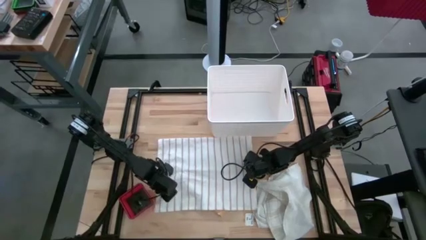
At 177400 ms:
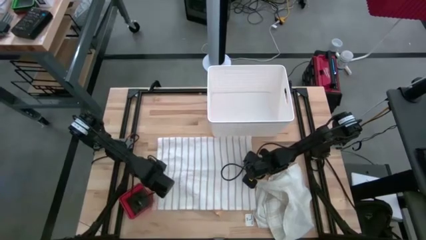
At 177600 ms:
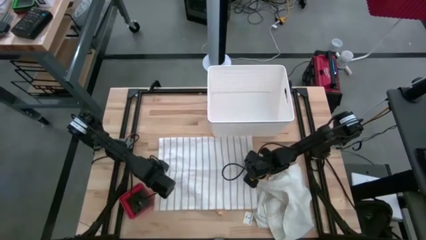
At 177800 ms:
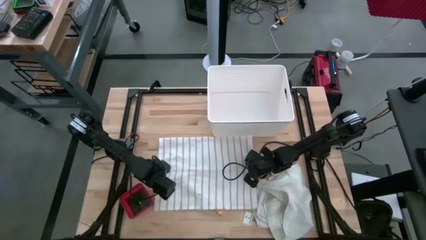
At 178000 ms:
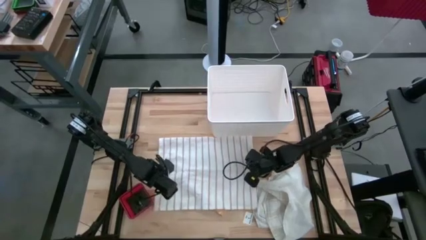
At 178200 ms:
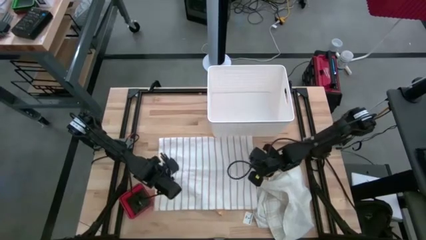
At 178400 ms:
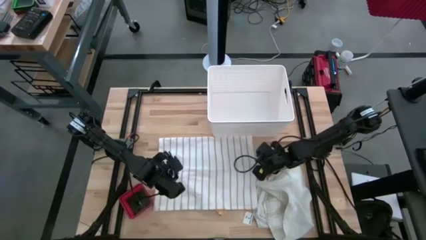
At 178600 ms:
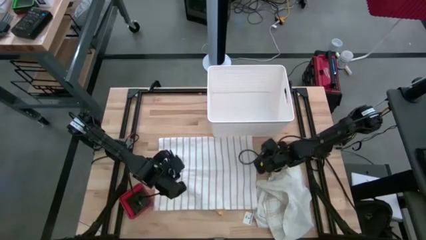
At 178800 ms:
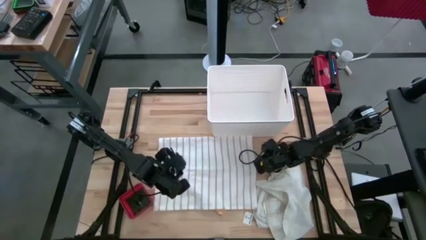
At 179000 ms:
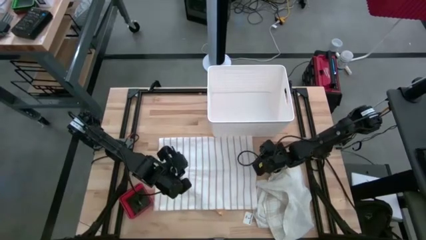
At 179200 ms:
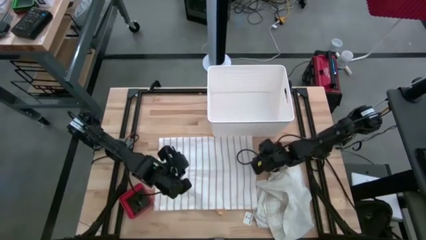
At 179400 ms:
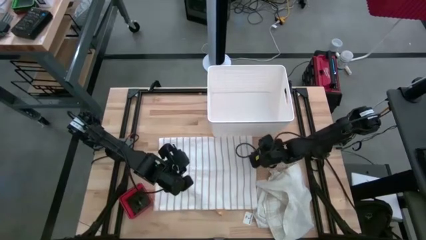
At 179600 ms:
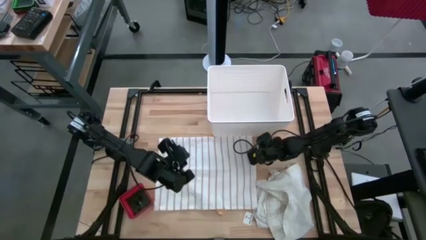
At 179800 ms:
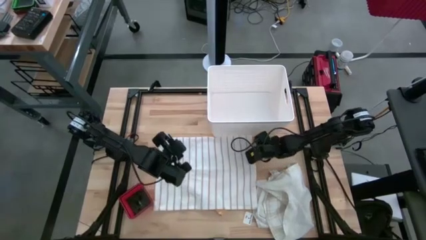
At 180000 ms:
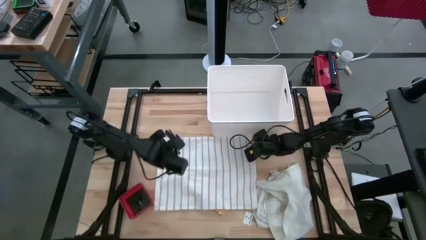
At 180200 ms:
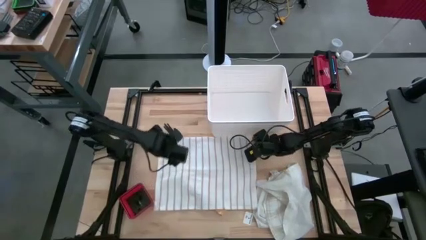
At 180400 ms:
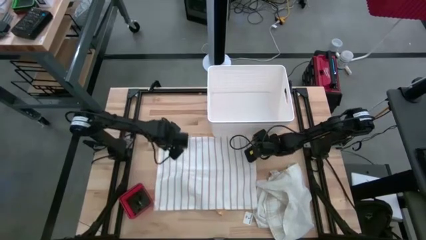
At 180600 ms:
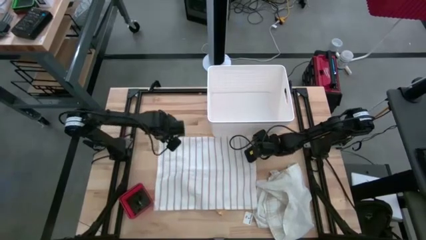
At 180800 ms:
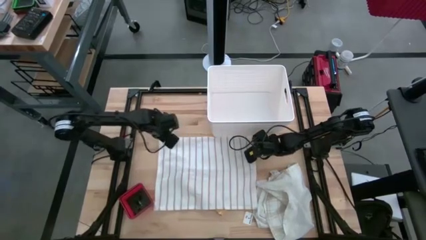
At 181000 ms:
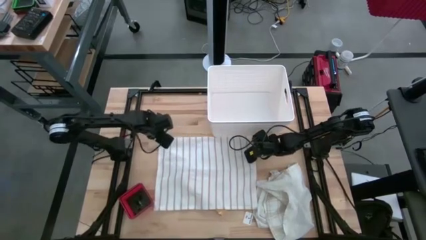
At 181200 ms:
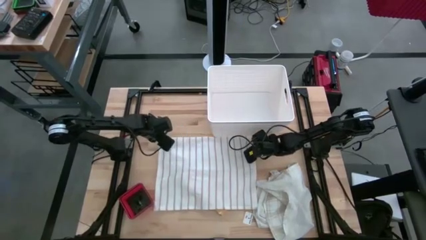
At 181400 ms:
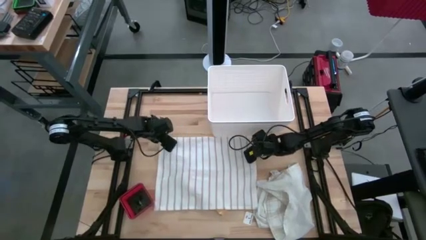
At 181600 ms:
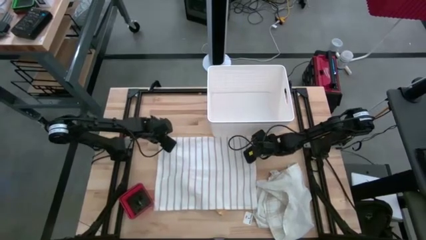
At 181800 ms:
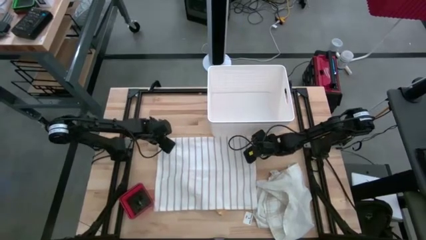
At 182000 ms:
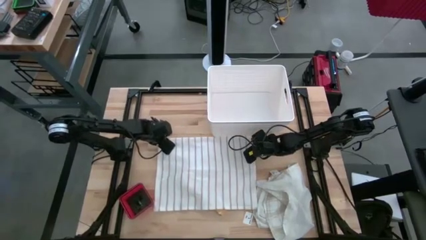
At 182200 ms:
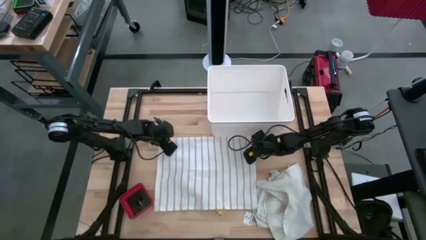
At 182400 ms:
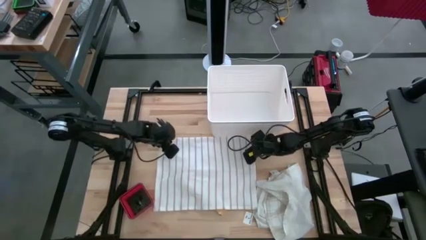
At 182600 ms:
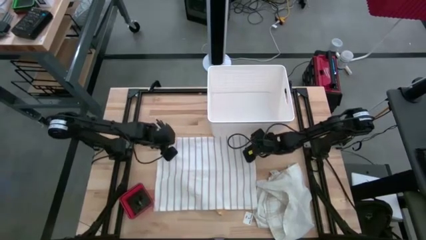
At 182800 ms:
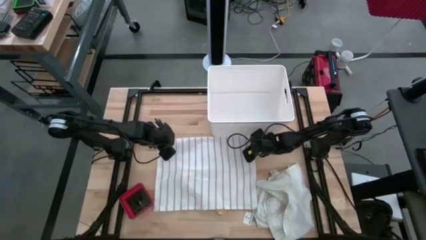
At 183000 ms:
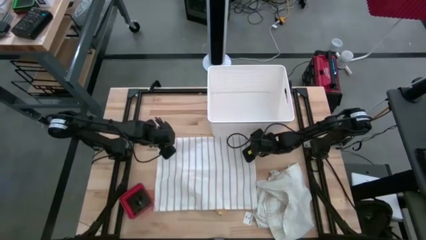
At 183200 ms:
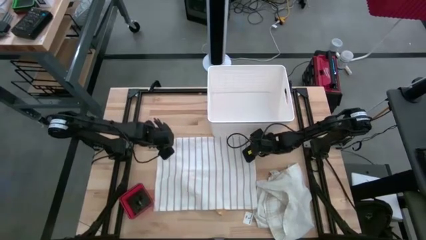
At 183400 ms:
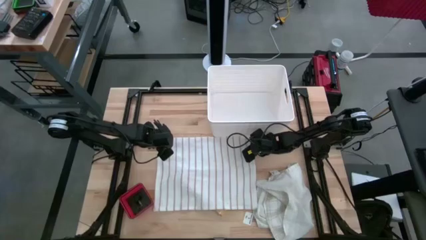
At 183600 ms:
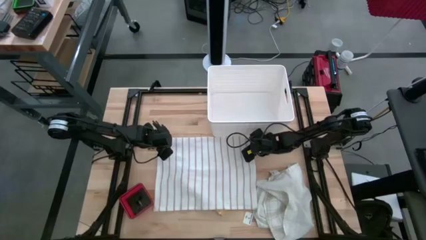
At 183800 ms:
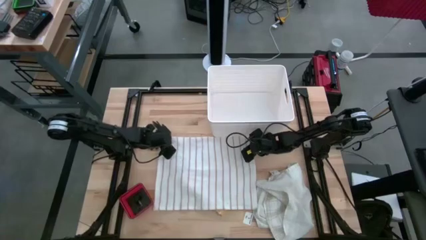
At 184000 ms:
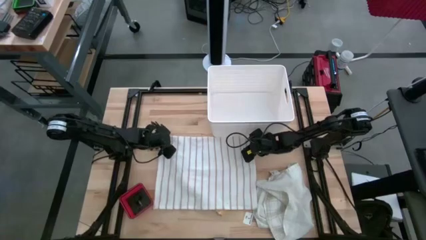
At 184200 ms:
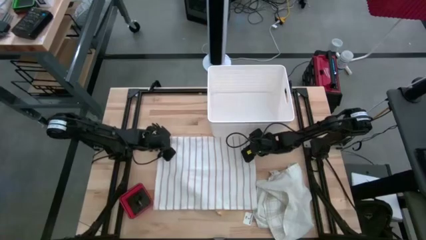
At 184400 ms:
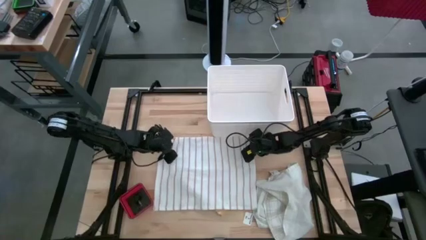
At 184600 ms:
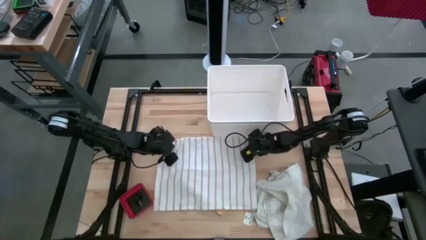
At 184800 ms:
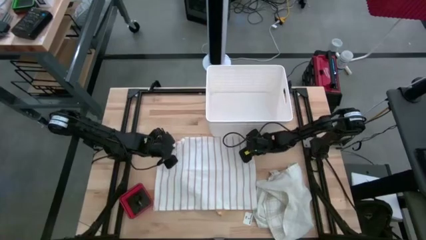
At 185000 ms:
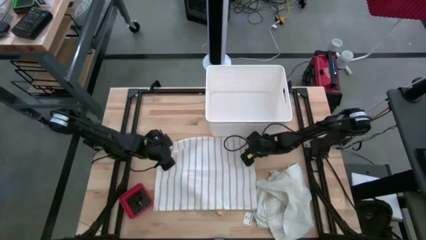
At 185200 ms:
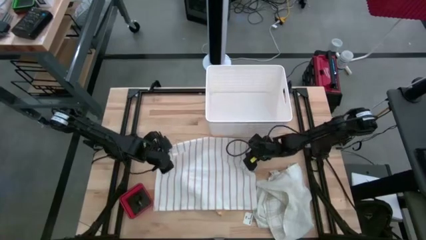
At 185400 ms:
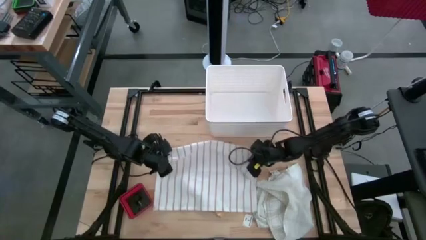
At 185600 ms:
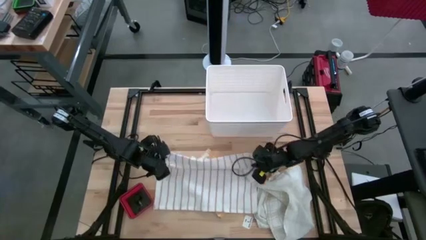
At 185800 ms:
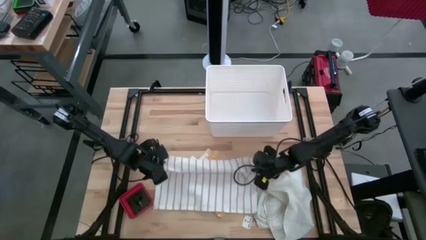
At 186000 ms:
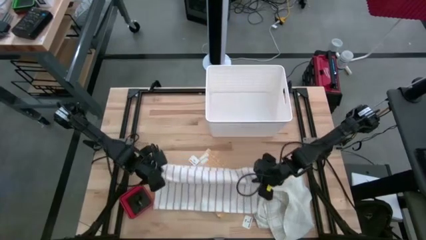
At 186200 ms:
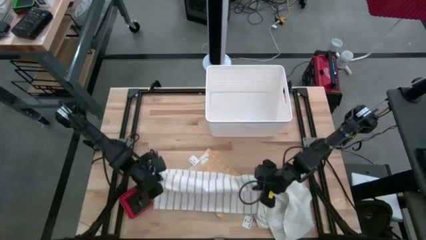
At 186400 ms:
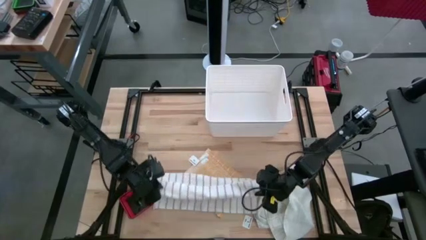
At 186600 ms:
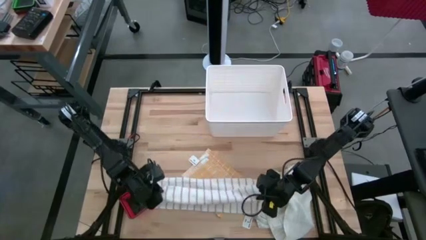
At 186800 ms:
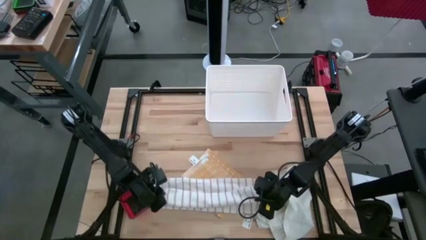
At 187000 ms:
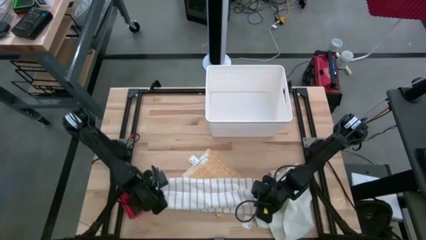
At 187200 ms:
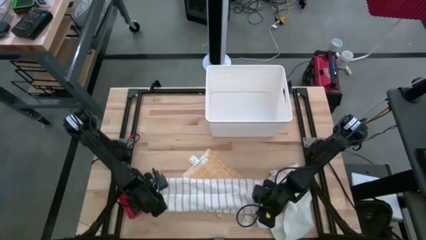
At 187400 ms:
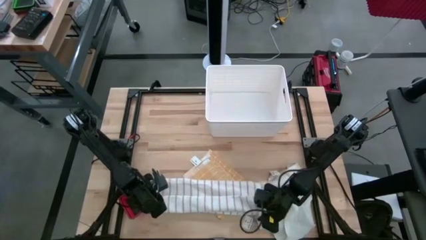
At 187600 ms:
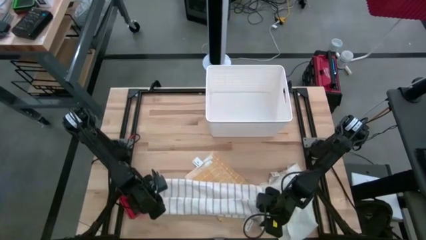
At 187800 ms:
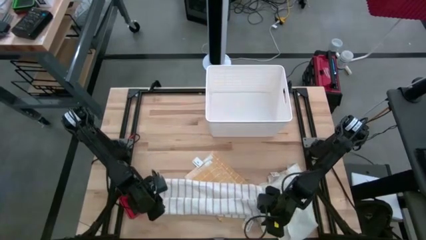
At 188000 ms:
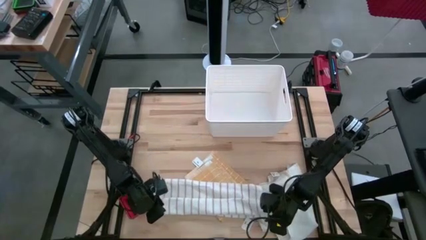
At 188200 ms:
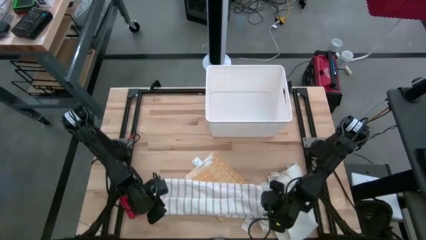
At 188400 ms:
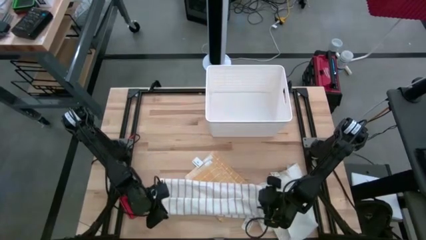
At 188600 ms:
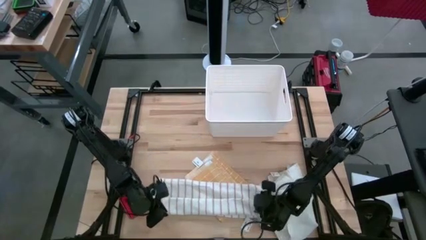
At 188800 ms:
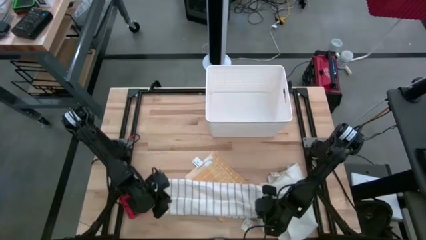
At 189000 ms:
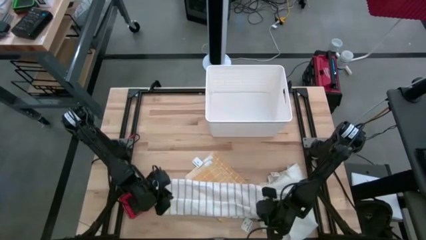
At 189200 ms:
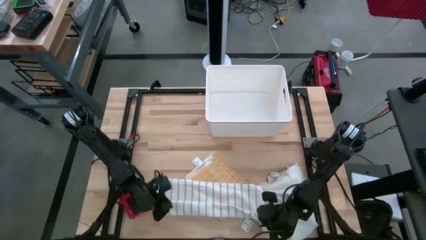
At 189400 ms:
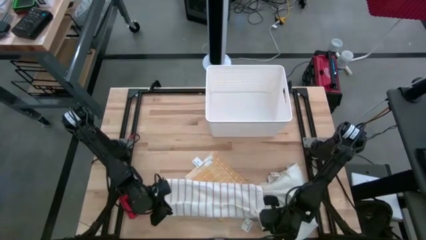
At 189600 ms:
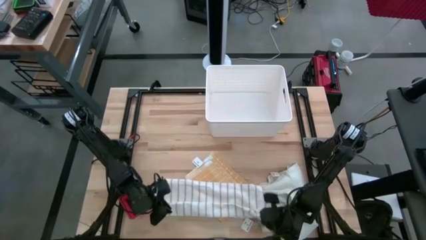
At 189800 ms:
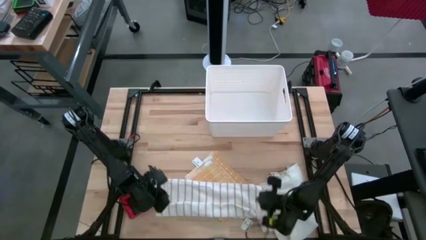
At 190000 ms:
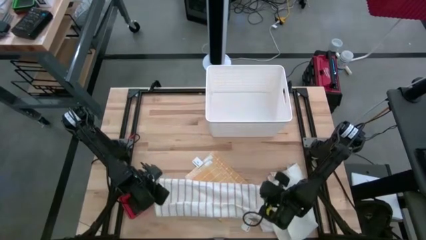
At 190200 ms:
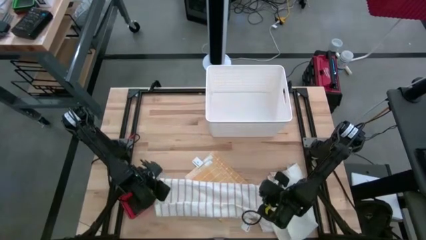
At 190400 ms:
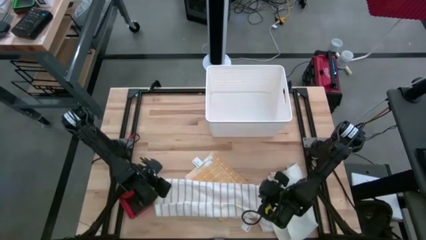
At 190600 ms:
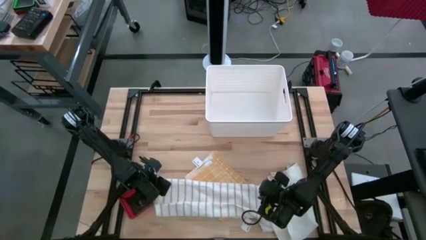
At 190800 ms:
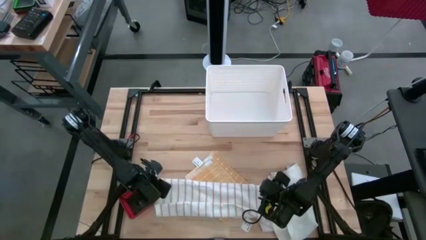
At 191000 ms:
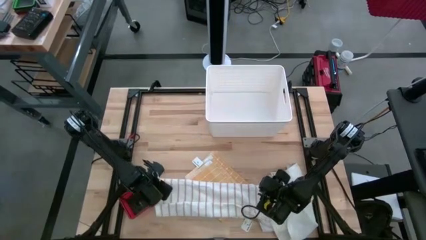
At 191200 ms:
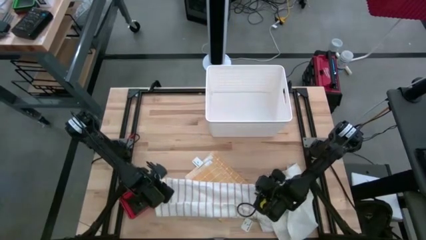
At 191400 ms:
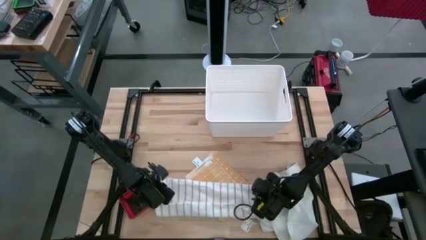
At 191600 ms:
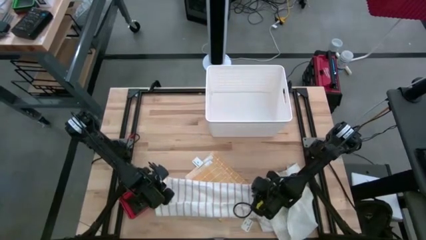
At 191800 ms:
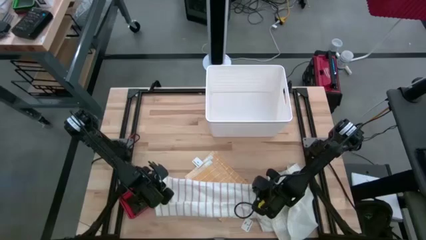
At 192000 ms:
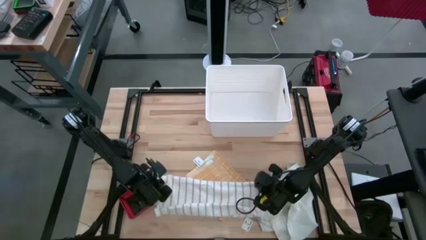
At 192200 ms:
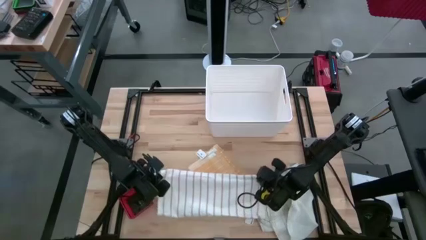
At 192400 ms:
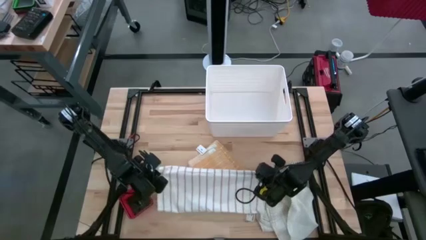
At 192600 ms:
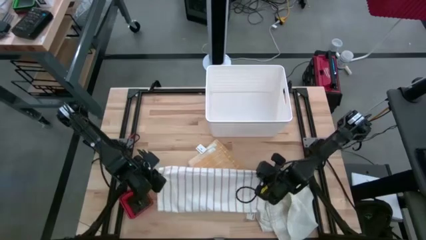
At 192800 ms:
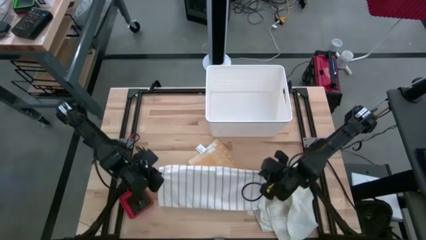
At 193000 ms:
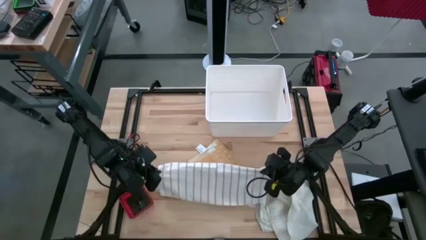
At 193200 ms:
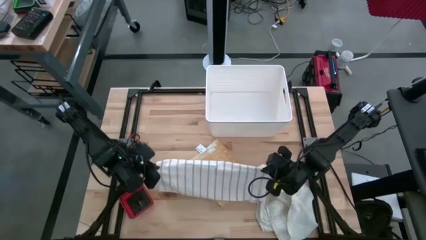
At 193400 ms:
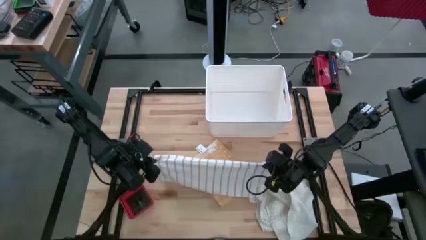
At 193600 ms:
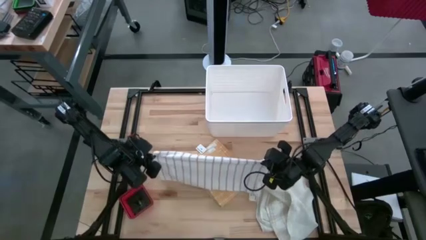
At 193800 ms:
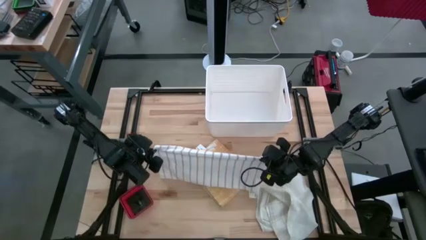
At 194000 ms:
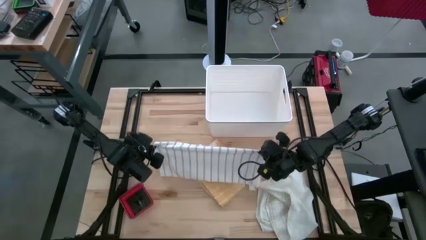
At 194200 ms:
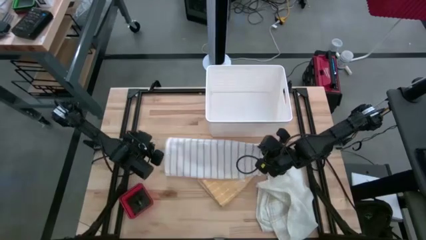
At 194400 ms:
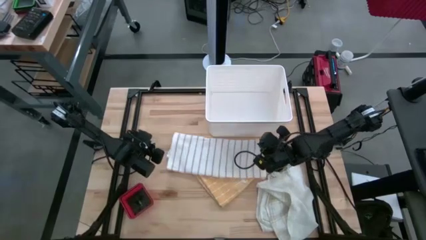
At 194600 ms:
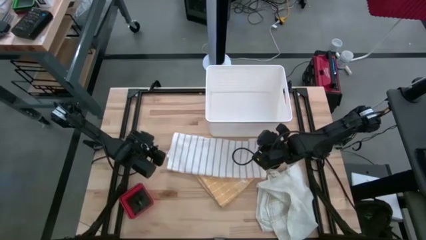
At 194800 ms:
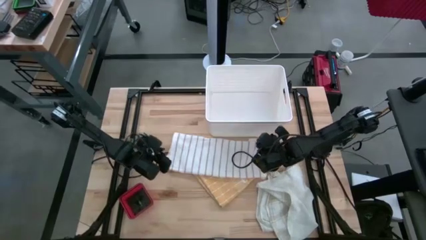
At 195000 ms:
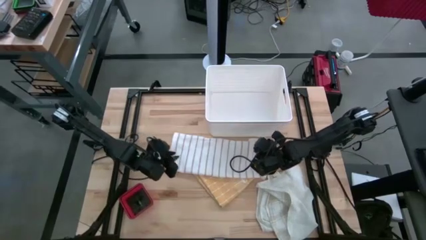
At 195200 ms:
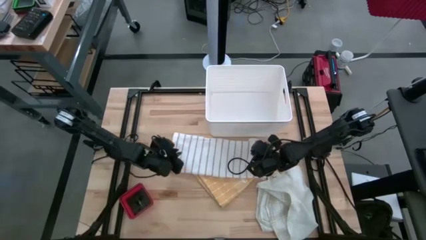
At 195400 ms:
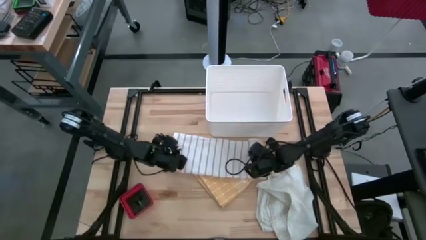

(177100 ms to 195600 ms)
Task: Fold towel
Fold the brown patterned towel
